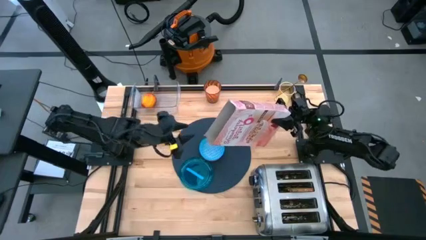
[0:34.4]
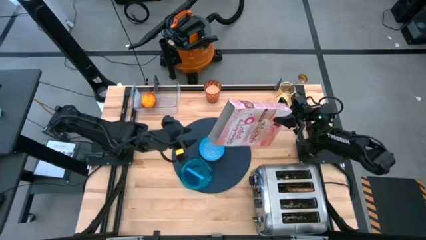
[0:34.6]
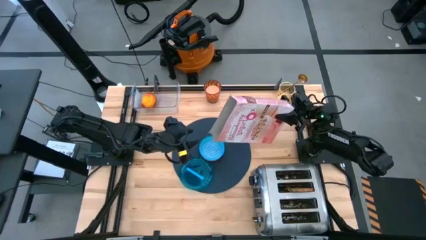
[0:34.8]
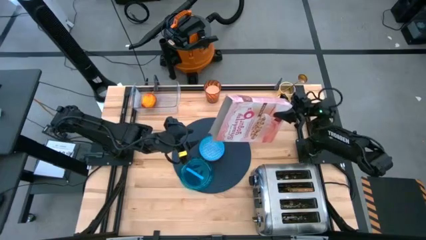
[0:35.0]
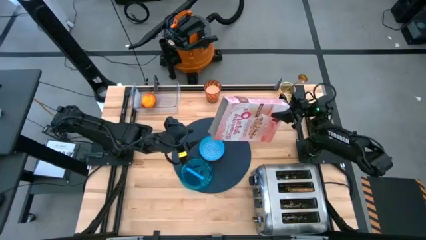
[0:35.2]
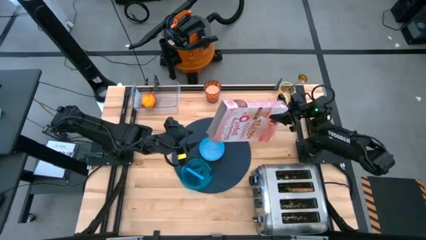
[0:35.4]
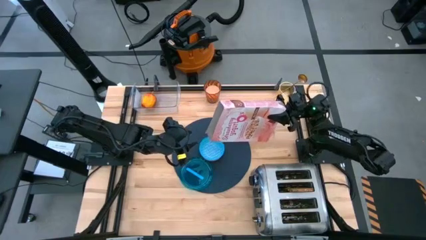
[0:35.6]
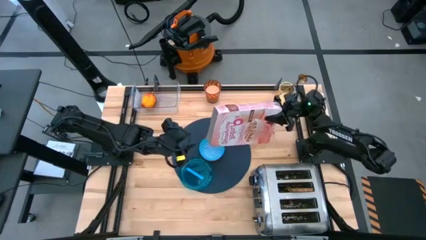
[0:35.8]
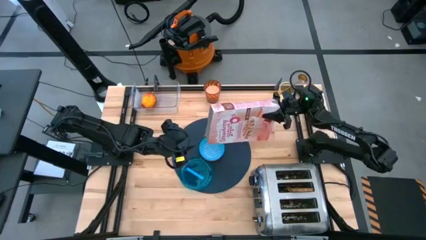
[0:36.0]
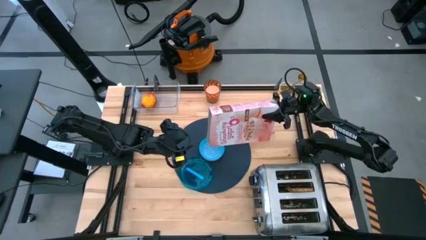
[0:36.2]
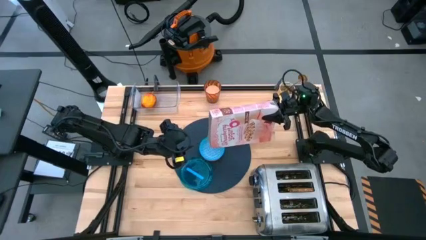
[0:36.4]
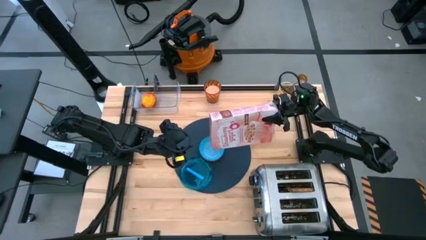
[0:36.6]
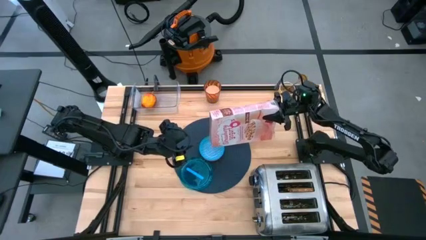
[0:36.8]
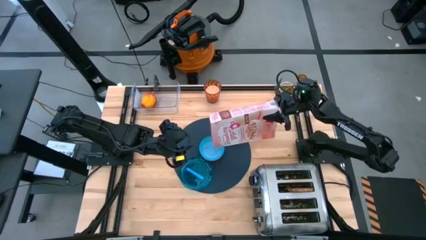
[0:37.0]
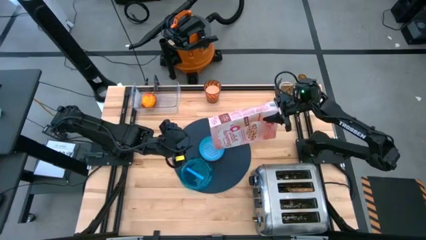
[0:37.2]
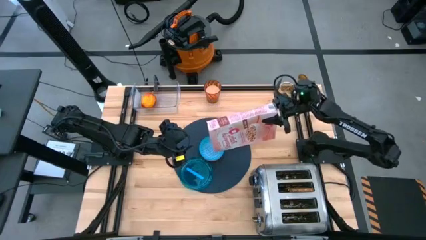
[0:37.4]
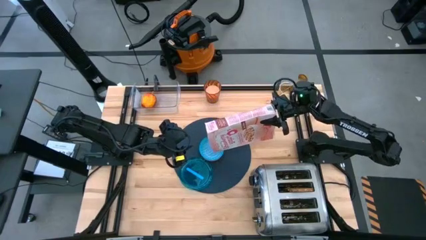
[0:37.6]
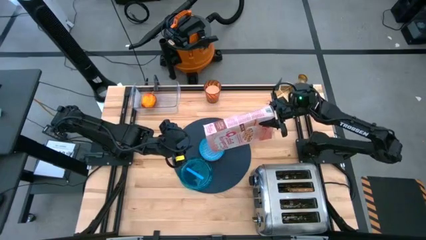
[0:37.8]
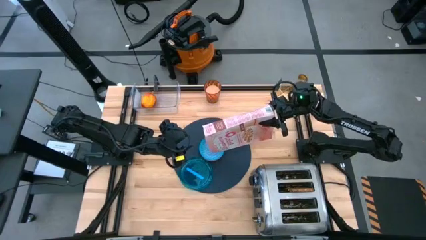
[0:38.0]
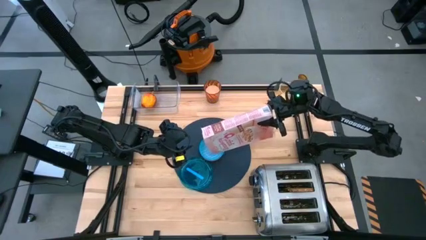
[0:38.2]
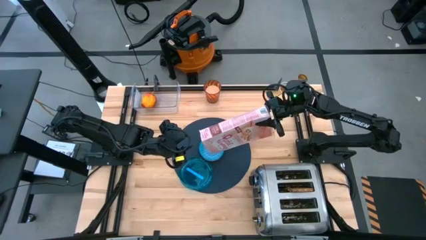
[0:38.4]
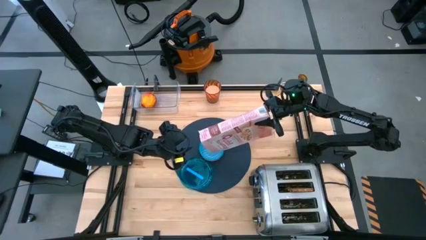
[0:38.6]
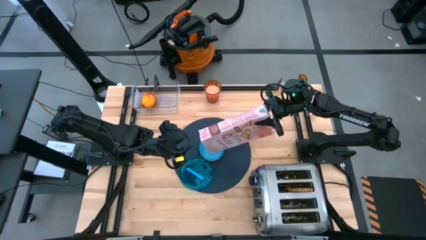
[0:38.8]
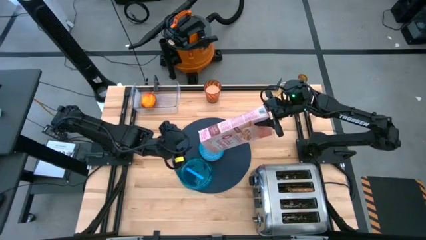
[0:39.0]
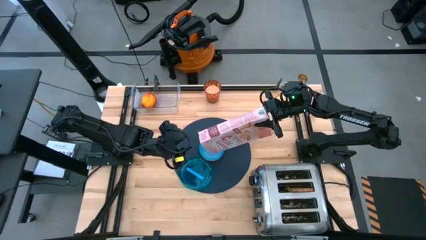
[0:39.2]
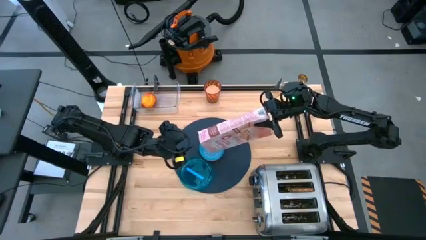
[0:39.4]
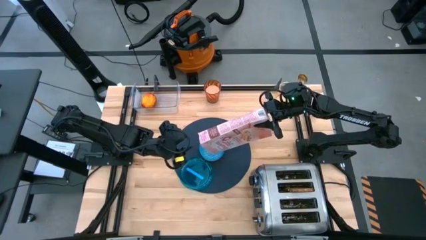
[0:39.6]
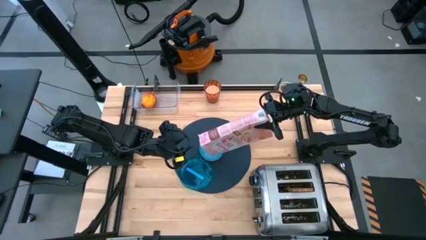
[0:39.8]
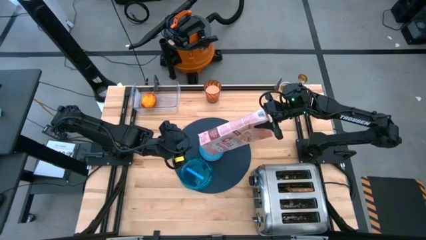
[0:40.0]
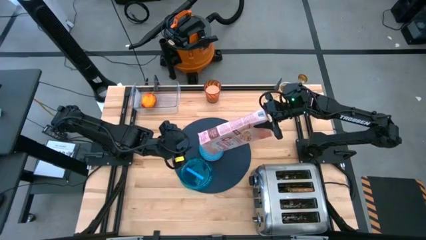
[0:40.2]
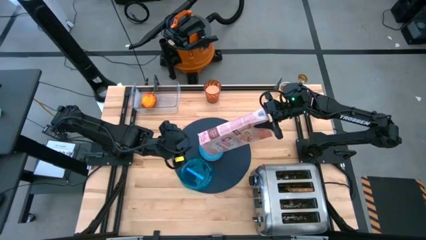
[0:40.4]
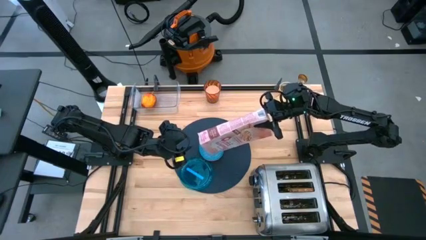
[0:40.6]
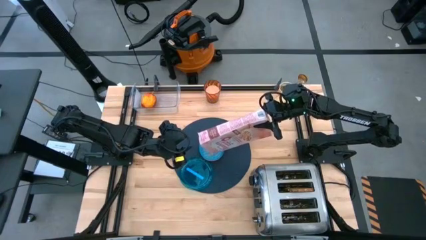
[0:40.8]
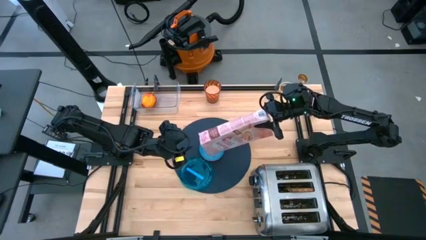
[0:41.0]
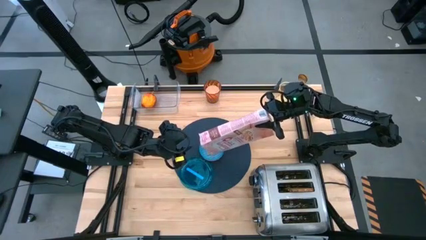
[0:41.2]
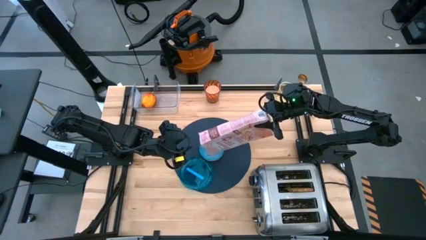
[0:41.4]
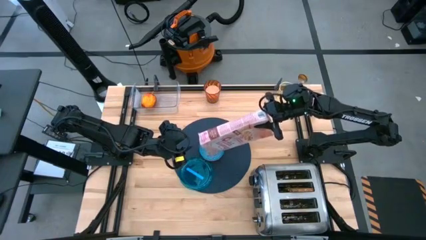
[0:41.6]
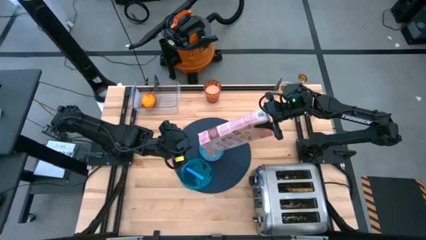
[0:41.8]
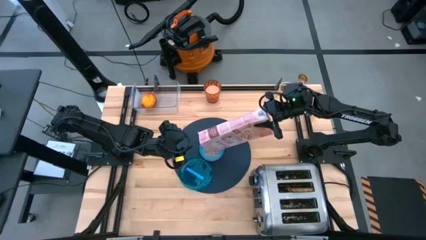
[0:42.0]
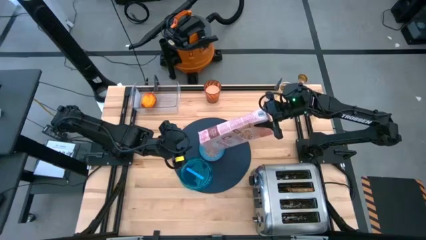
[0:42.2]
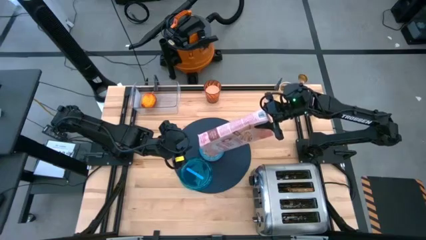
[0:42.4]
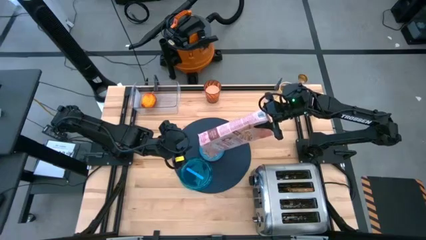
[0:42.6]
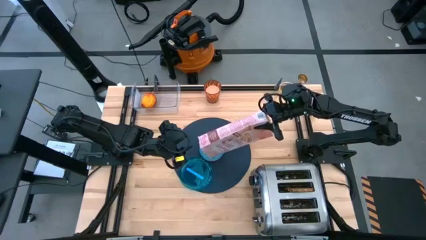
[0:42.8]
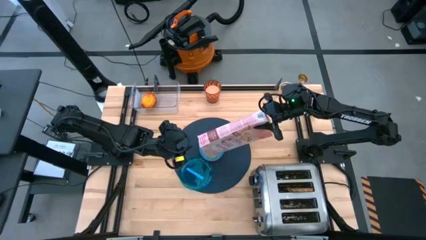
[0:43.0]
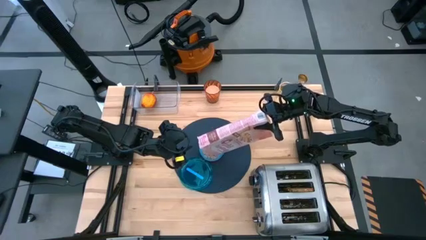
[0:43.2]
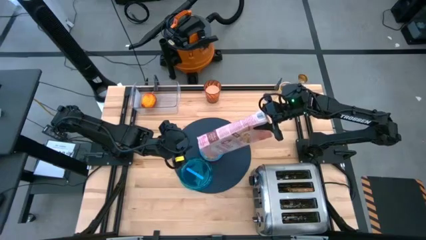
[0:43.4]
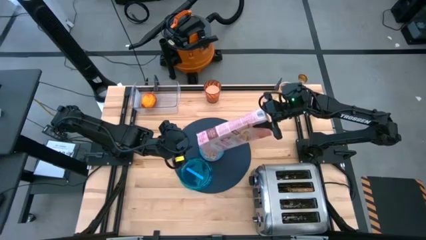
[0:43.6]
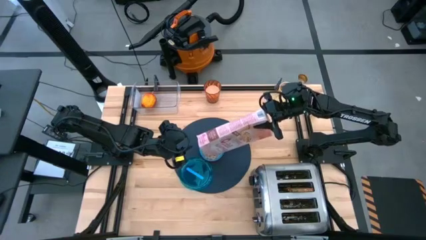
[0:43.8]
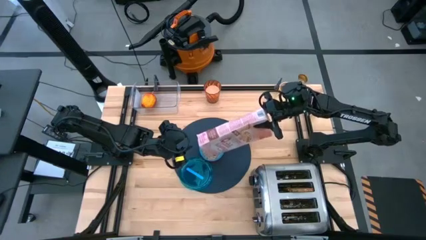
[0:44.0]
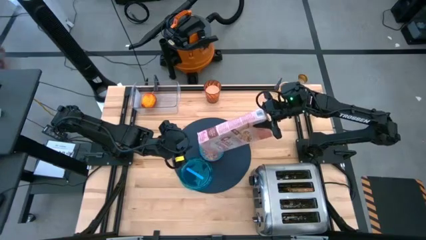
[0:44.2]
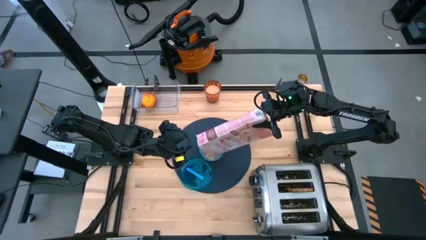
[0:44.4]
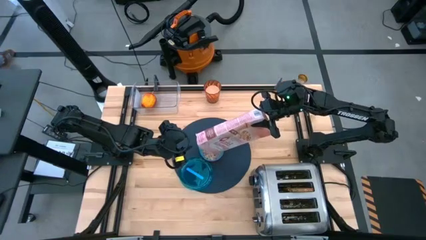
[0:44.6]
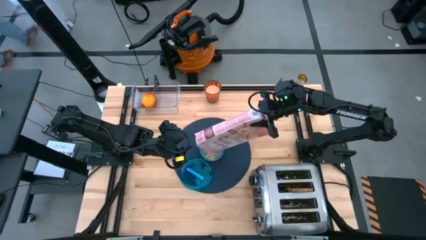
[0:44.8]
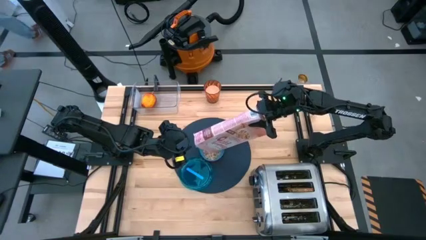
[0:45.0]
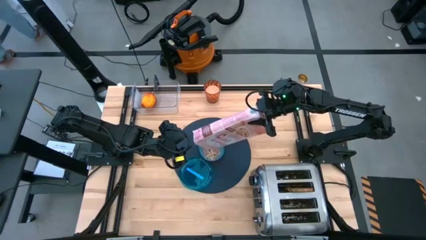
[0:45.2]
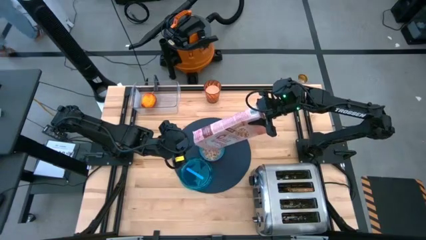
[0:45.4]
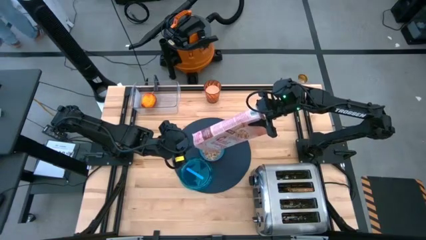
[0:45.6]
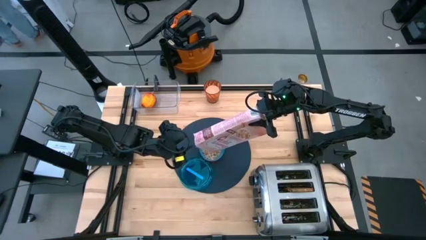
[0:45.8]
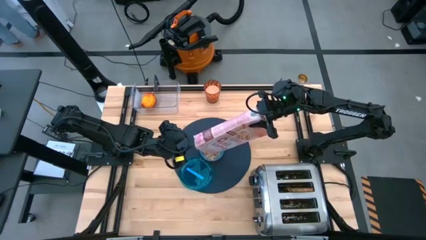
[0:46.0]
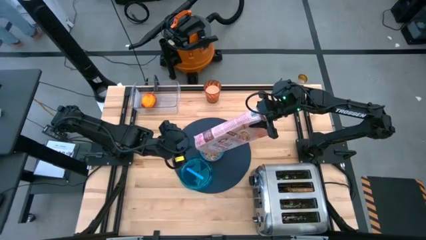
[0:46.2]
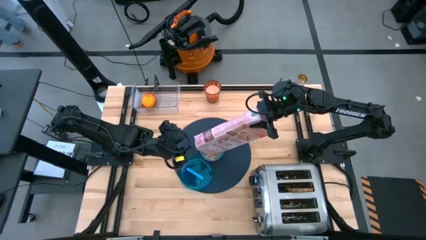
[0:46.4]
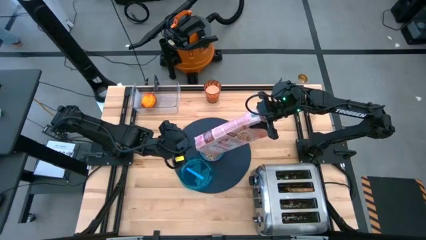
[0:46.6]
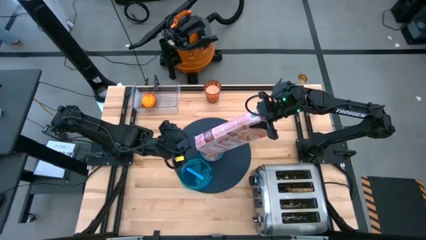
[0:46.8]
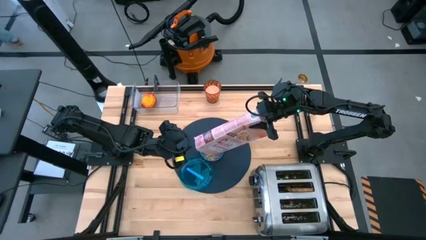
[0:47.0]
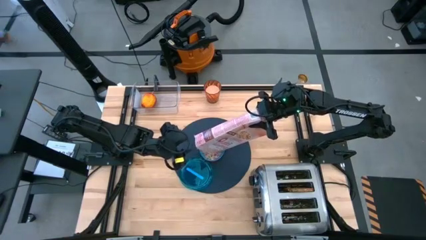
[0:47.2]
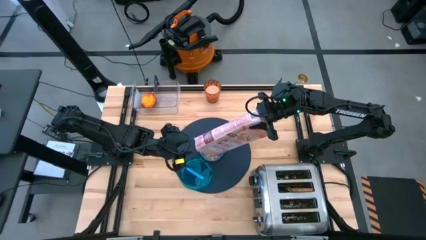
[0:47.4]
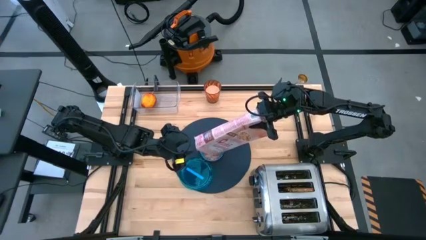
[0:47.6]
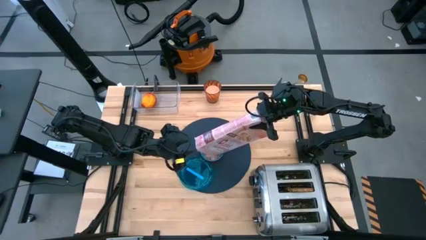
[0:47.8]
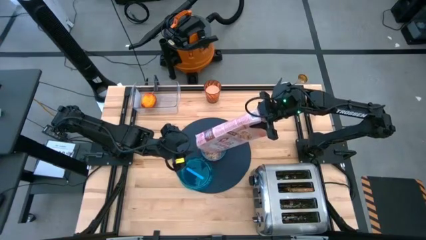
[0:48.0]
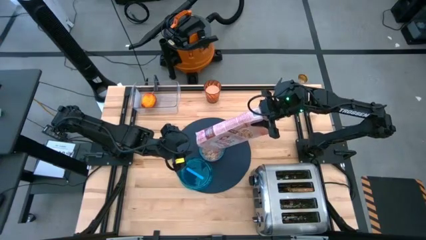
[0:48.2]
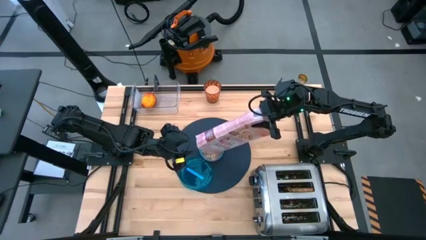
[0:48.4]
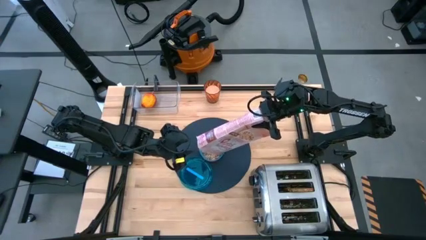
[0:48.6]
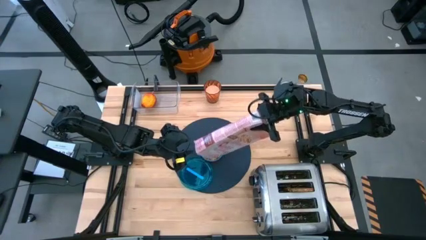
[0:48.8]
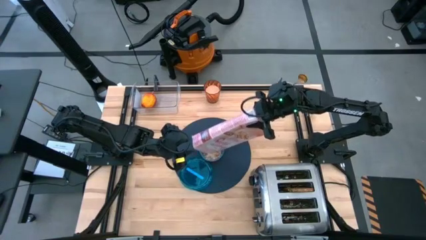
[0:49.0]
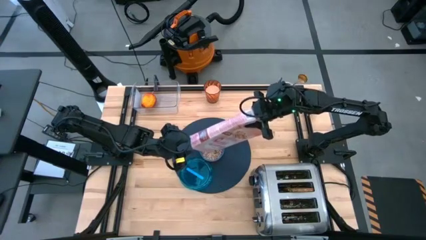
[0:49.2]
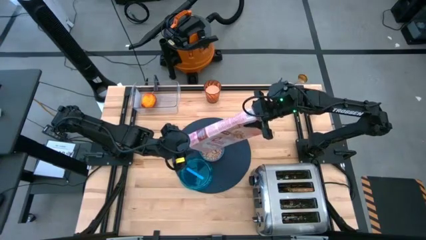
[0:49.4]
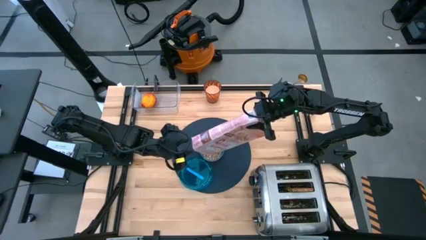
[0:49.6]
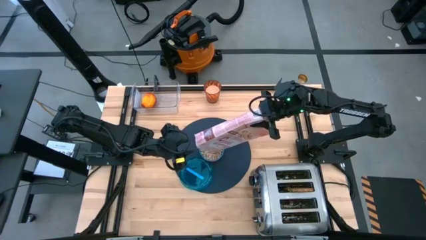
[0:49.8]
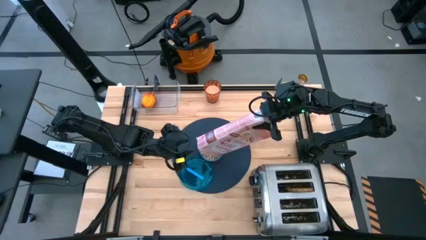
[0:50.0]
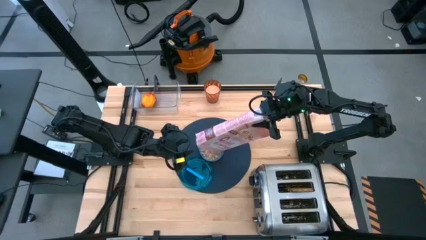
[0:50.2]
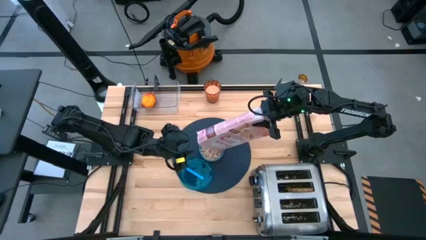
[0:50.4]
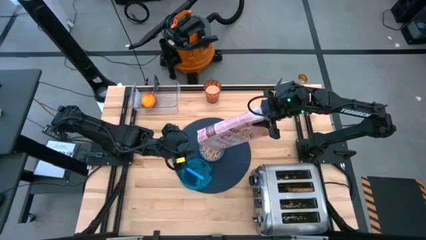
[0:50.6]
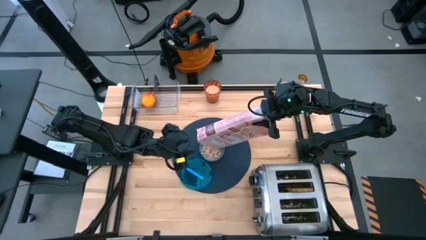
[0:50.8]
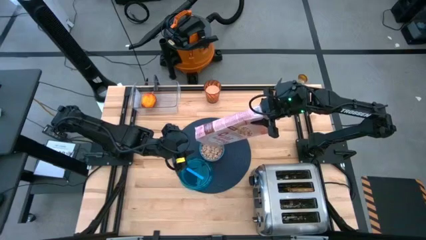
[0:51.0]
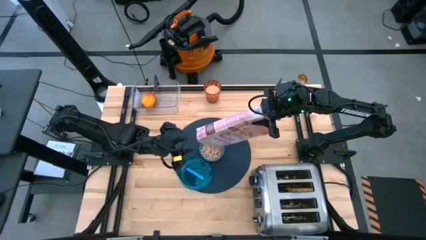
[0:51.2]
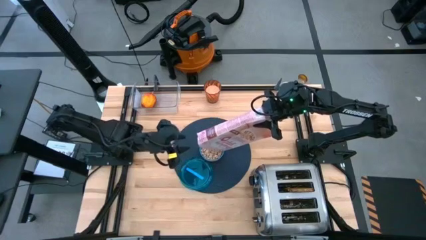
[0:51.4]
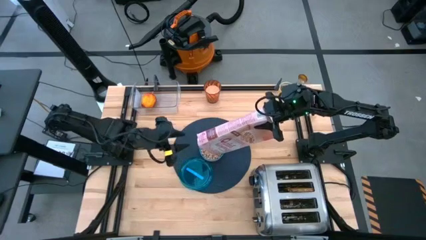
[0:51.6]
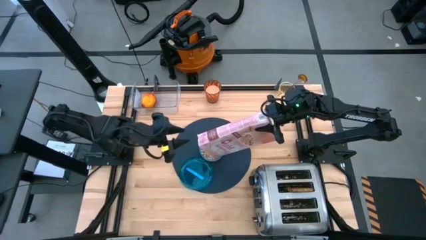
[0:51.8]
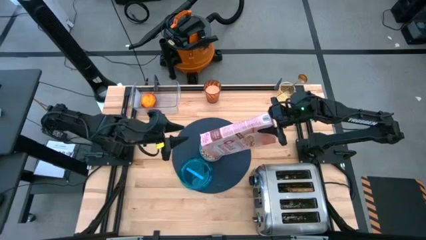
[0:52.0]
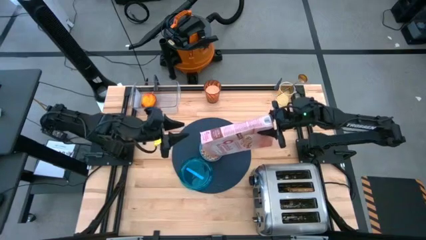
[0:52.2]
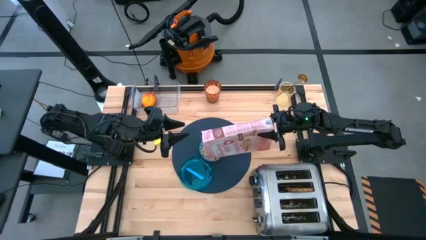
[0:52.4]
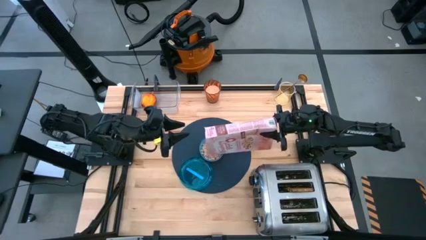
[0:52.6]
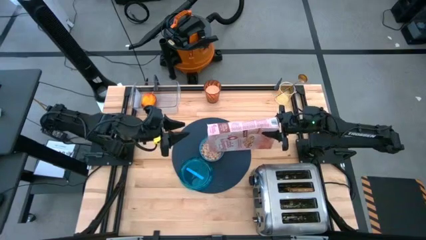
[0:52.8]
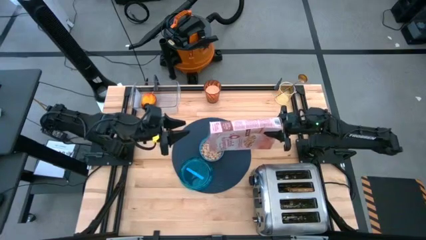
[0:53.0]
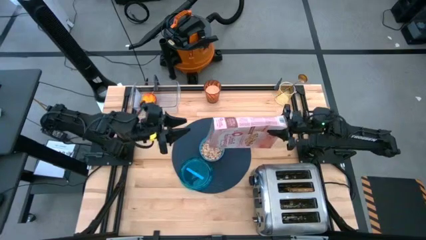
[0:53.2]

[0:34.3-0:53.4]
Task: Arrange a breakfast setting
Pour the cereal from the box into the bowl
